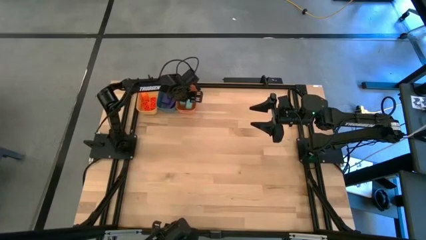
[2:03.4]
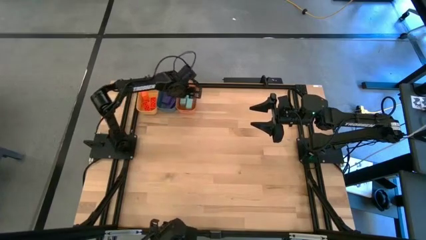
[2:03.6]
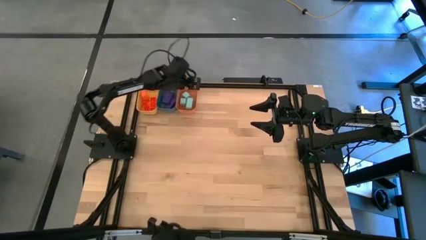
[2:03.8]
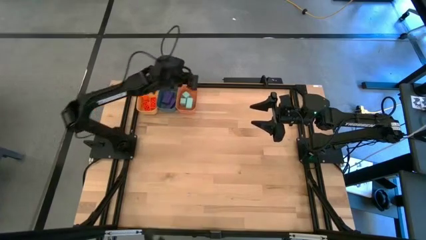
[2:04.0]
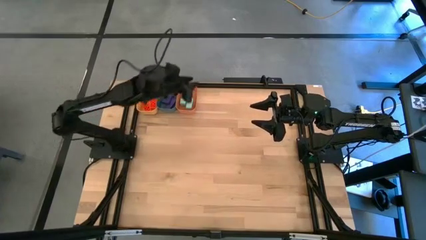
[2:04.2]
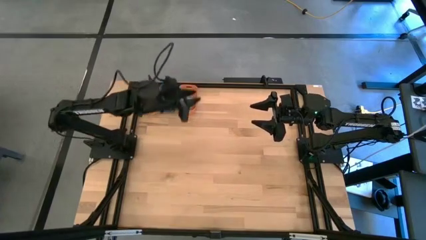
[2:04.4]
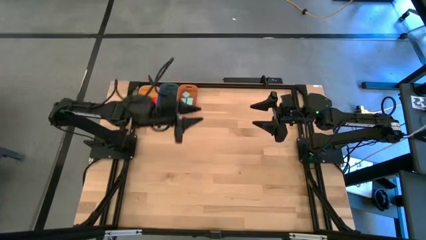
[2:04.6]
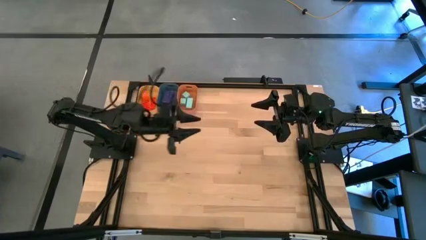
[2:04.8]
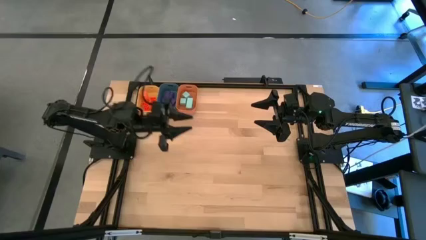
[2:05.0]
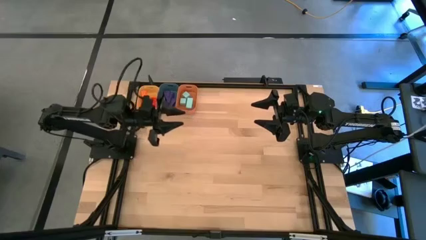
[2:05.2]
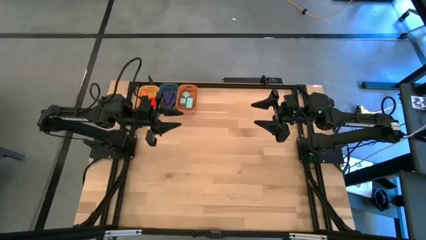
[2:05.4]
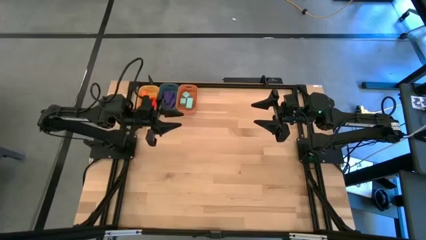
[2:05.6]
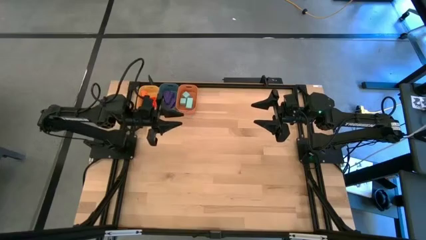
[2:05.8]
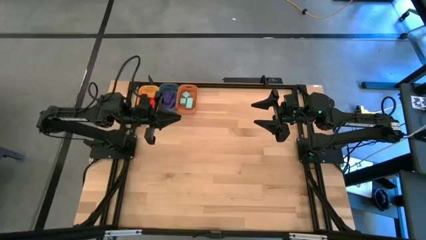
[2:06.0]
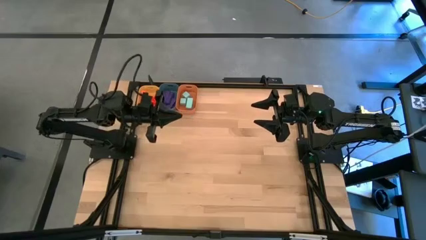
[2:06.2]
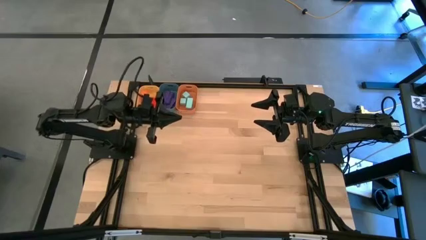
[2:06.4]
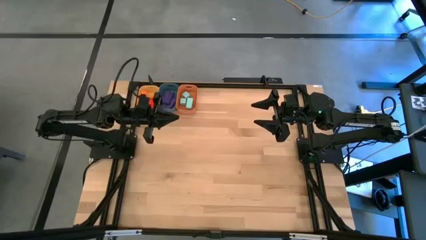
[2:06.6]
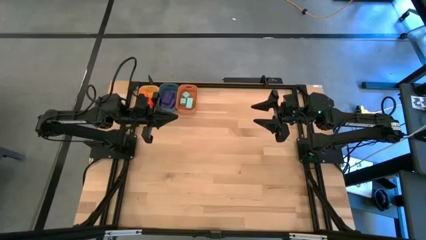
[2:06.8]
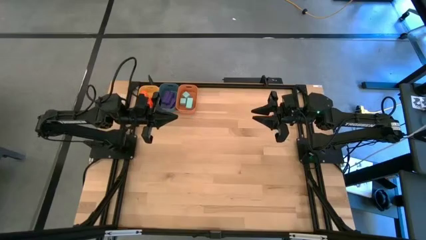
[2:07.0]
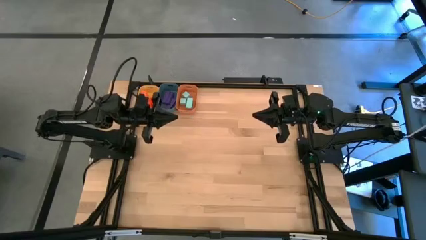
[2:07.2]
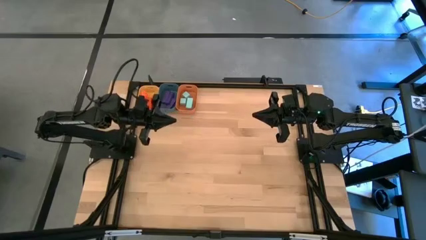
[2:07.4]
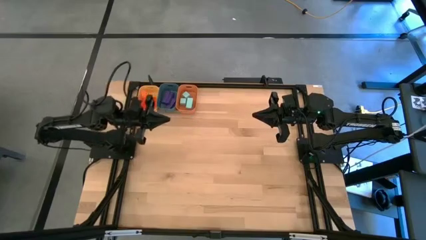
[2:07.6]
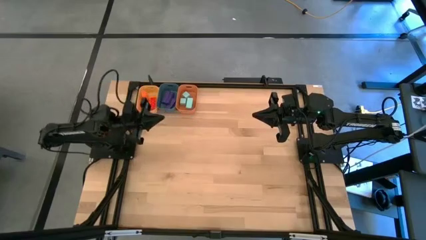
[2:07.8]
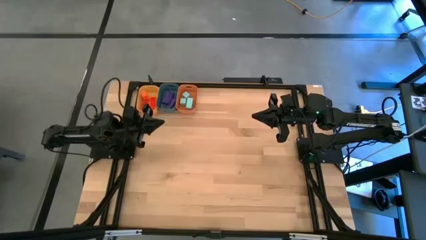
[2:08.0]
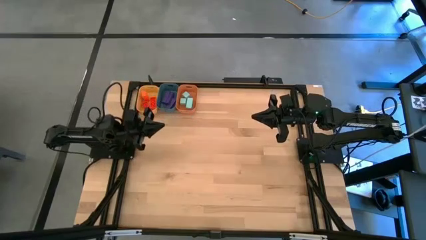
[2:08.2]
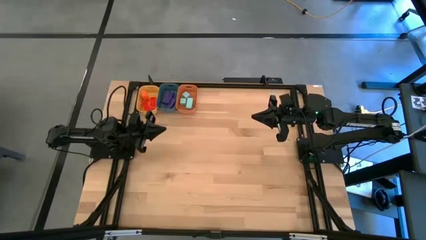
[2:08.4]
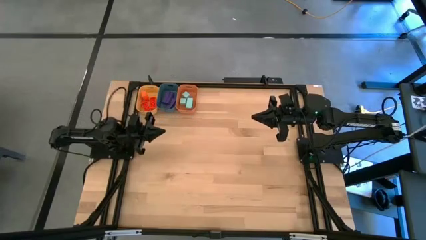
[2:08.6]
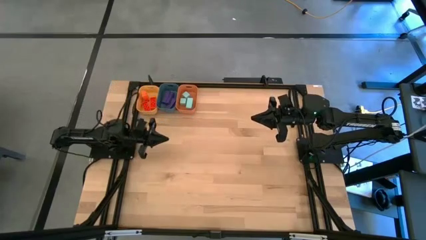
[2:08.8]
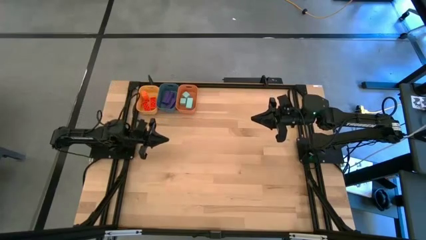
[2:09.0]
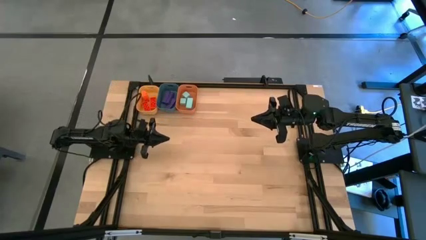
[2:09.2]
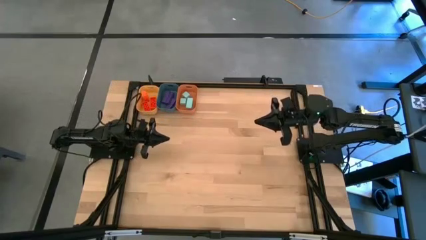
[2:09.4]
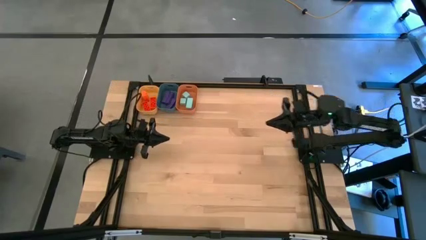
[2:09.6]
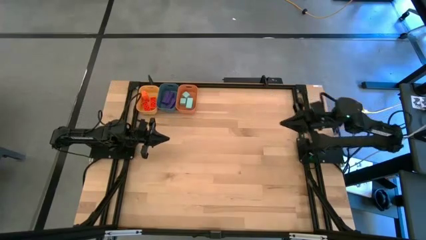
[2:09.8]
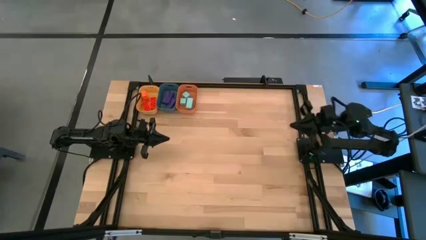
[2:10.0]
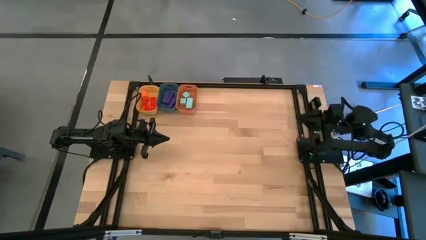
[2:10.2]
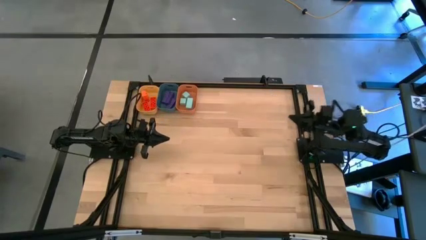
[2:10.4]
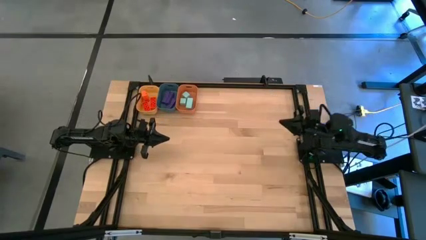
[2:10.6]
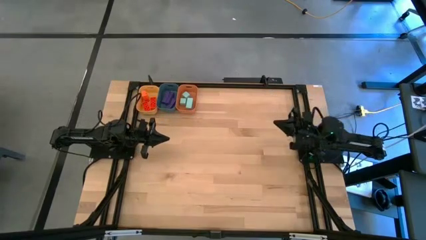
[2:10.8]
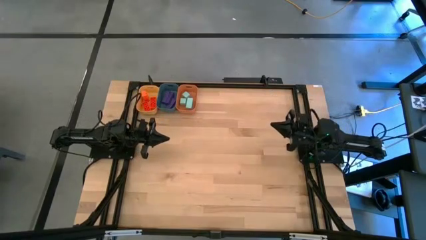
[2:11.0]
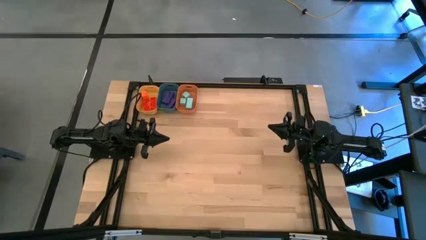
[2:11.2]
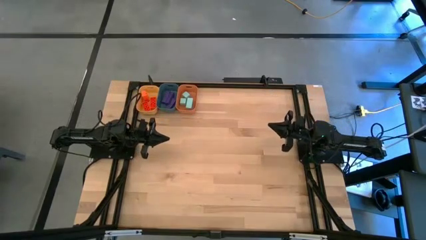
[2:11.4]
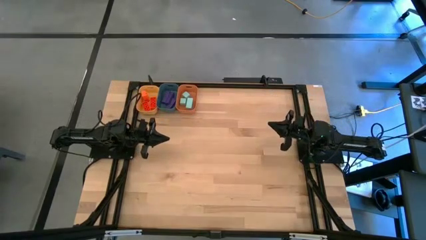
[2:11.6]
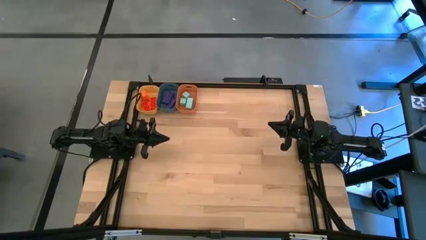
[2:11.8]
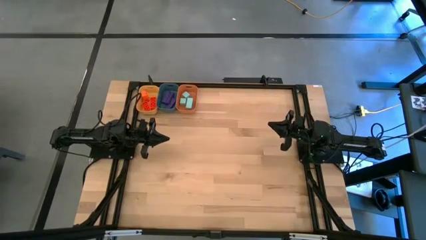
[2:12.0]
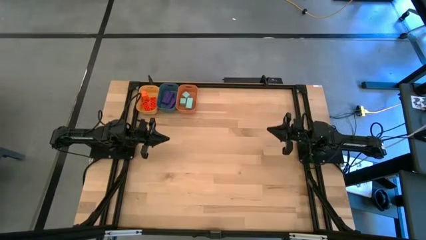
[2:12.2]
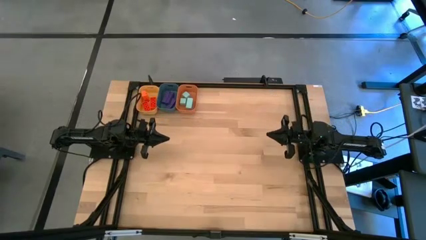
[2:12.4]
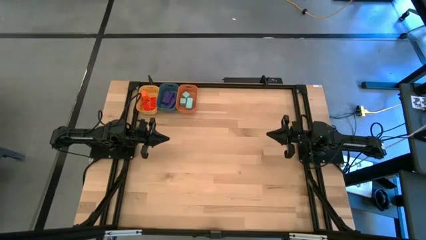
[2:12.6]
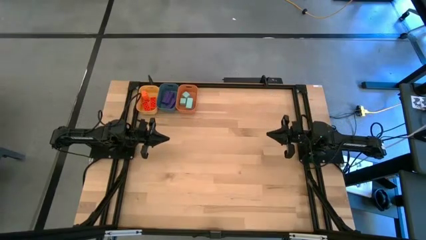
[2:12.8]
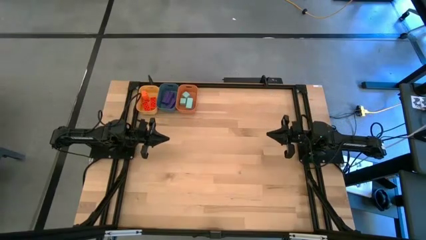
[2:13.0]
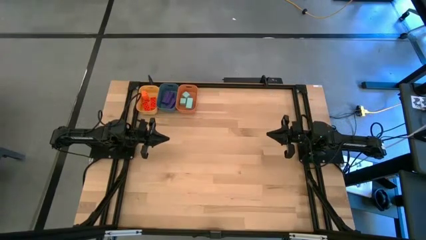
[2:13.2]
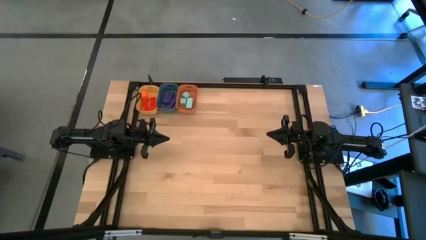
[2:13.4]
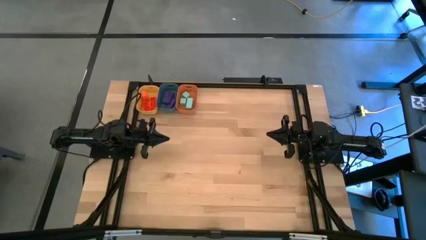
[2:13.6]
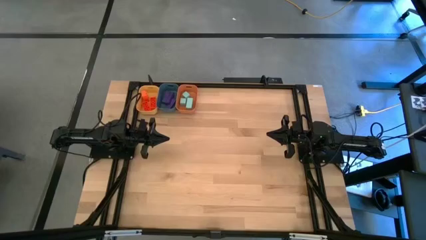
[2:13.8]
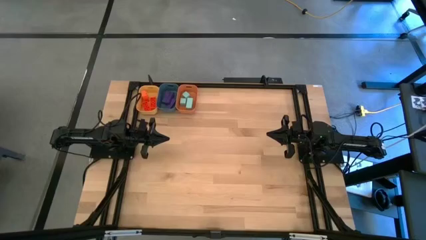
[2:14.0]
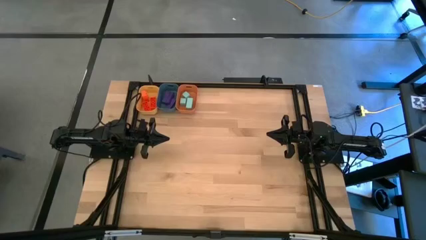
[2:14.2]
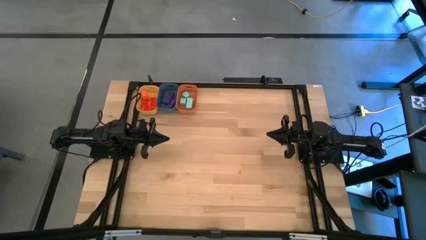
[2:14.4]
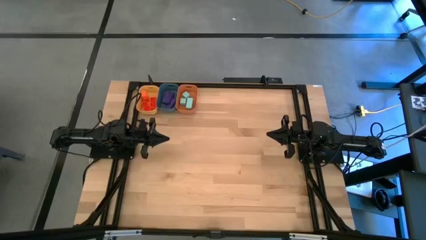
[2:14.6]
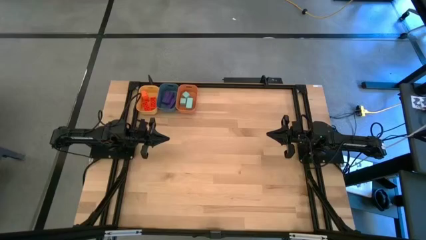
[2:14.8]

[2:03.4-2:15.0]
Task: Sort & place blocks by color
Return to Home Position

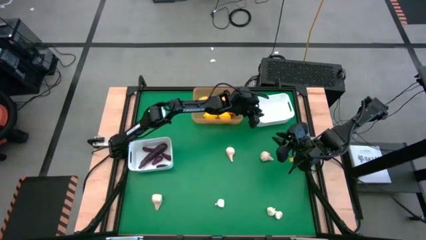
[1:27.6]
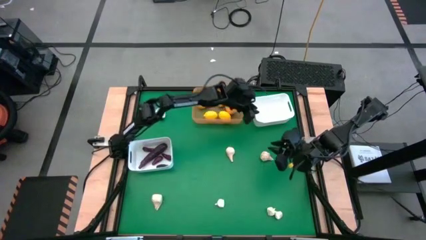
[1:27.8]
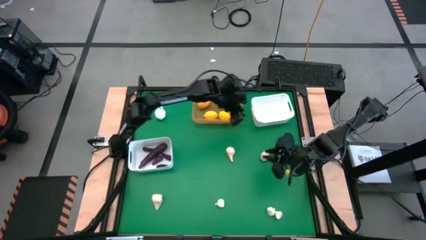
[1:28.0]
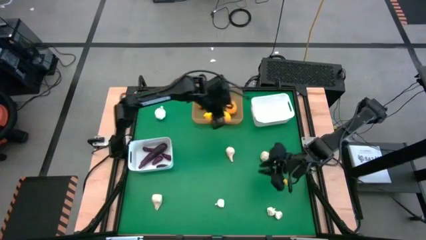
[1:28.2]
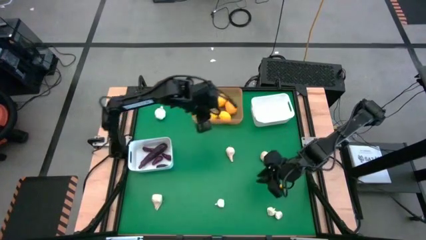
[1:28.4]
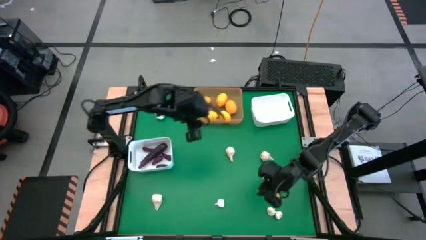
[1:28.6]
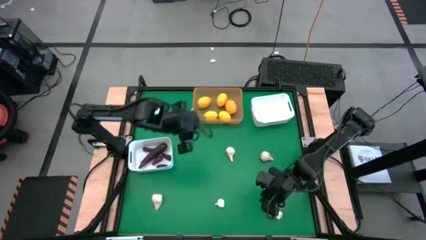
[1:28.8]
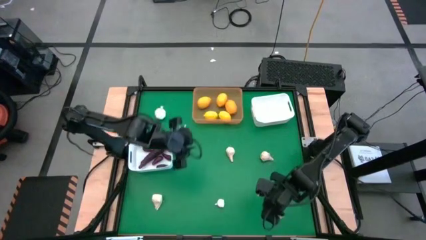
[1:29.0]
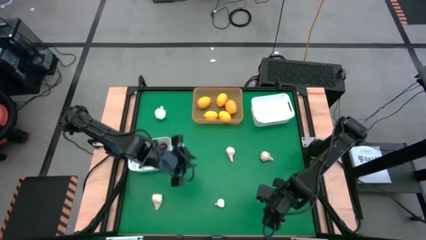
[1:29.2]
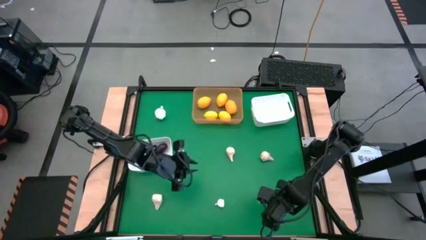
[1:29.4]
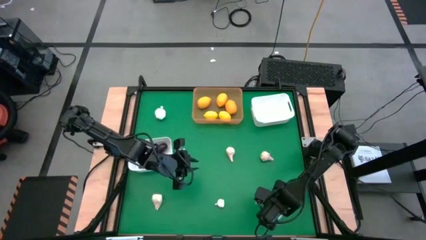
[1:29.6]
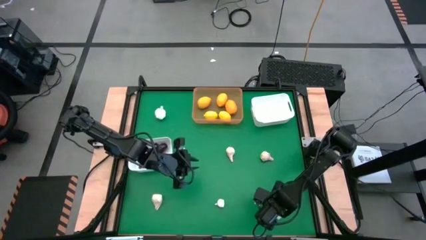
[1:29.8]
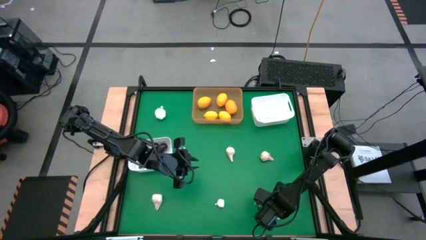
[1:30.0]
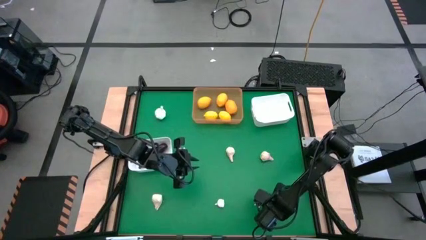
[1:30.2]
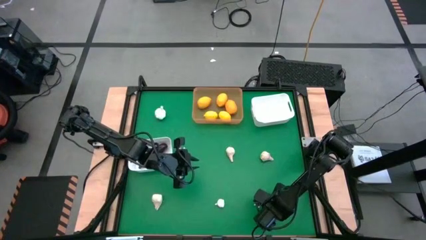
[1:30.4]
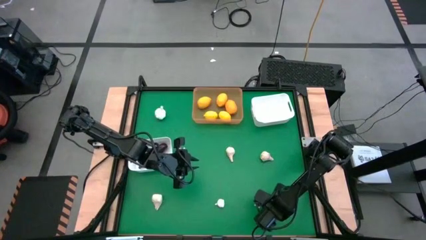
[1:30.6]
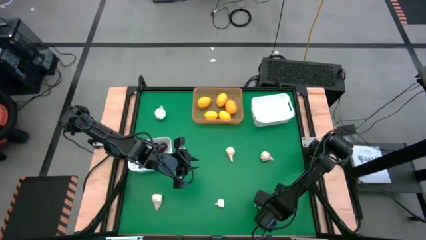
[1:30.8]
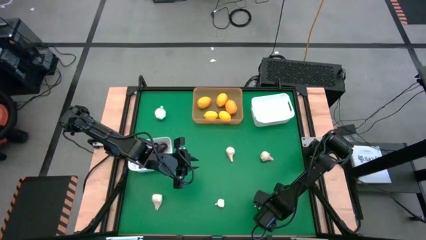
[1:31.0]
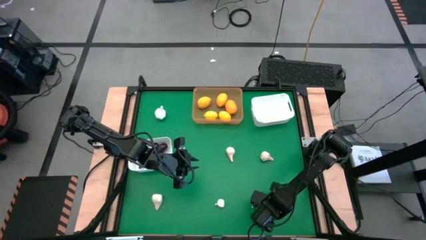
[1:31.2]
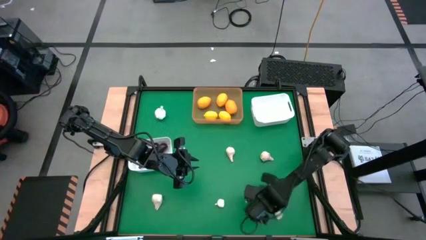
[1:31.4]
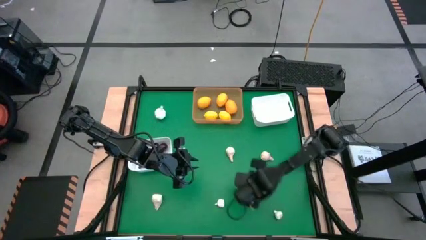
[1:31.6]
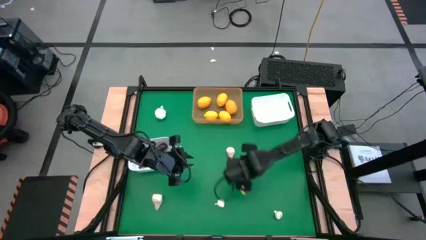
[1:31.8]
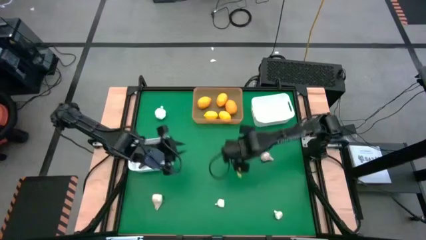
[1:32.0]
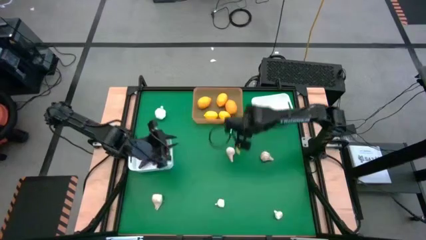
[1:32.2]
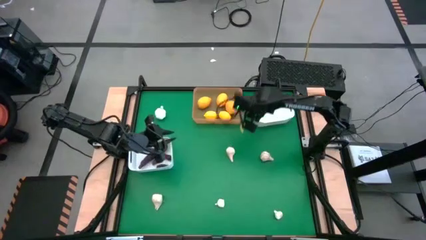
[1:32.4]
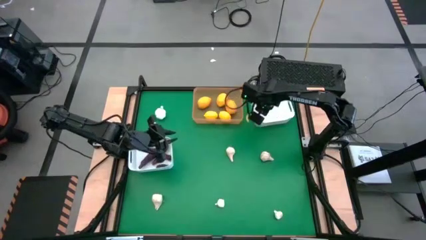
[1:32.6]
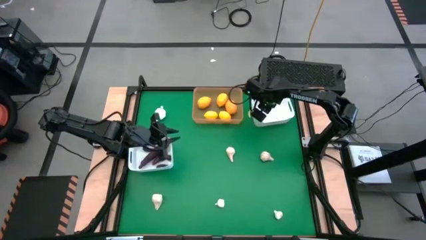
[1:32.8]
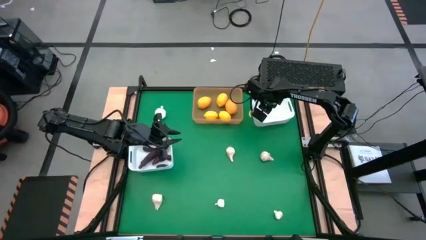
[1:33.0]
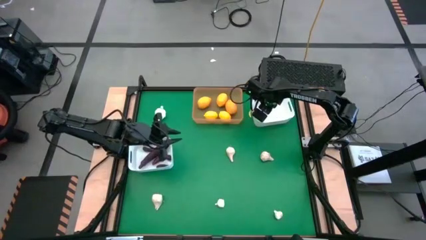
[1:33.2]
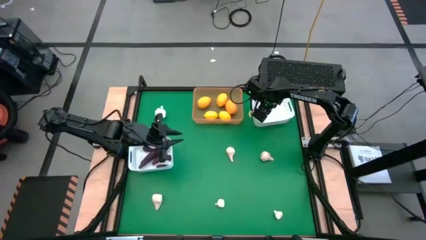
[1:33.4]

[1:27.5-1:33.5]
Task: Sort produce into baskets
Put the garlic into the right white bin
